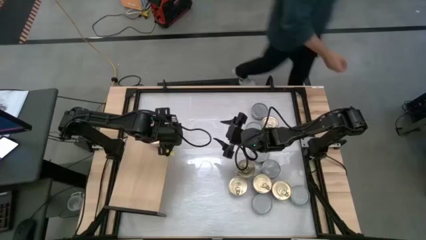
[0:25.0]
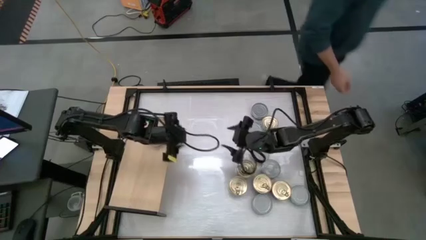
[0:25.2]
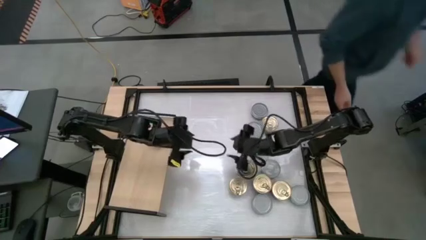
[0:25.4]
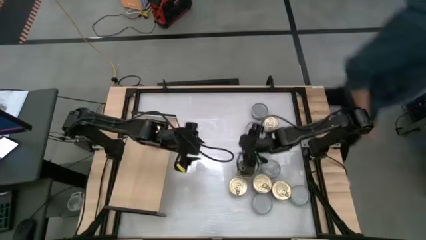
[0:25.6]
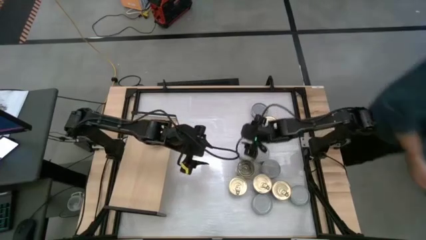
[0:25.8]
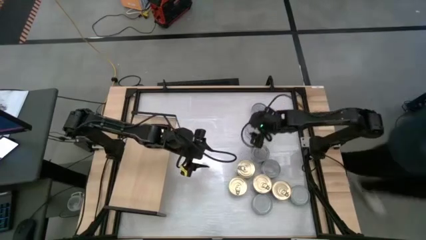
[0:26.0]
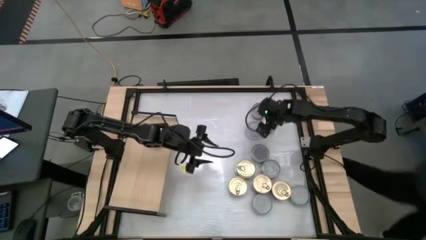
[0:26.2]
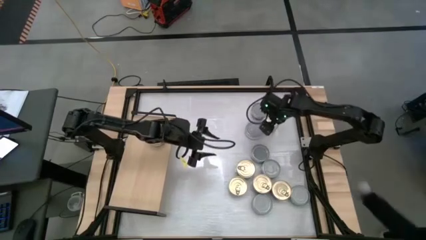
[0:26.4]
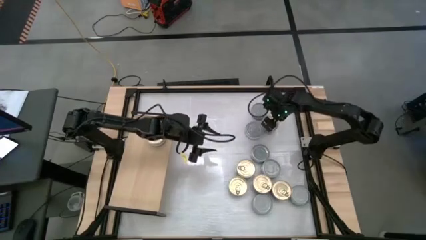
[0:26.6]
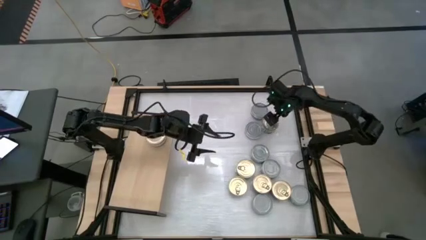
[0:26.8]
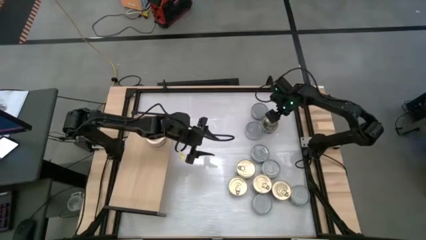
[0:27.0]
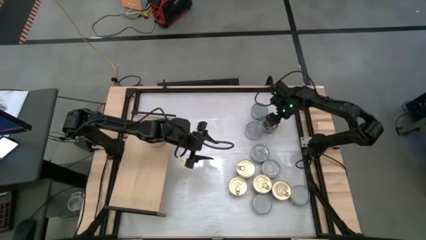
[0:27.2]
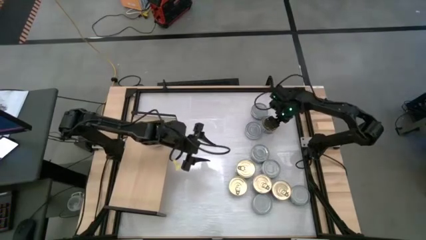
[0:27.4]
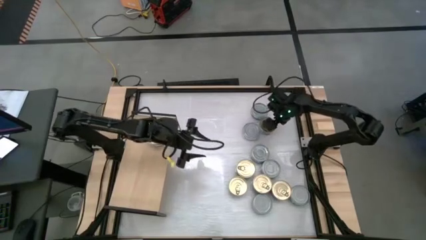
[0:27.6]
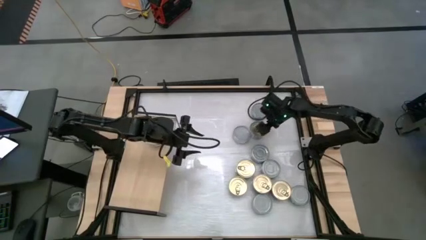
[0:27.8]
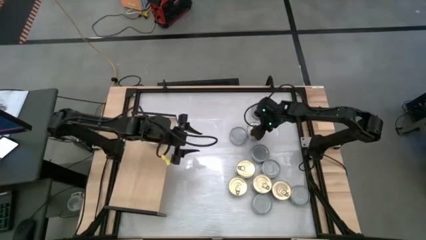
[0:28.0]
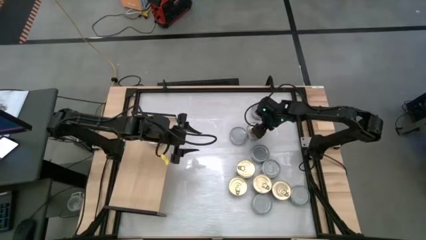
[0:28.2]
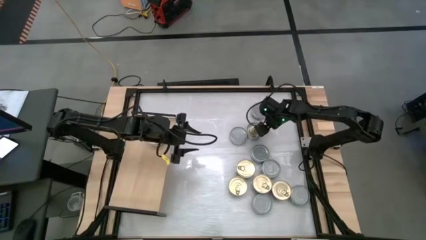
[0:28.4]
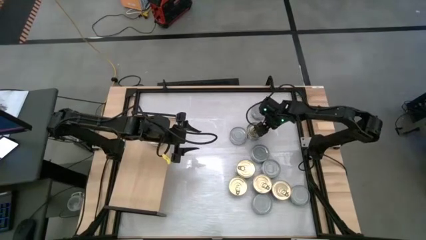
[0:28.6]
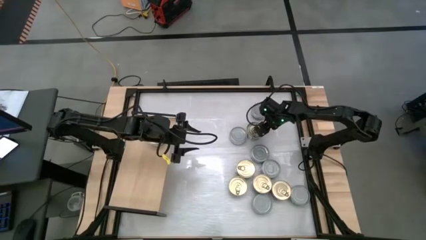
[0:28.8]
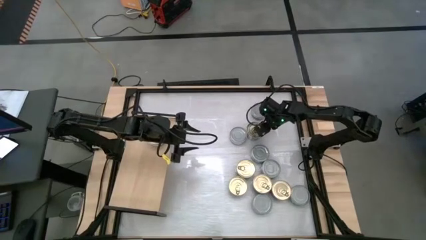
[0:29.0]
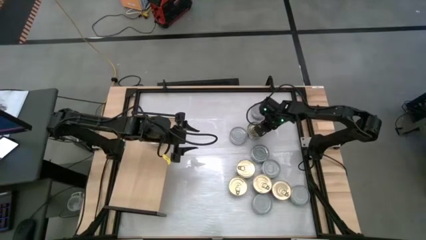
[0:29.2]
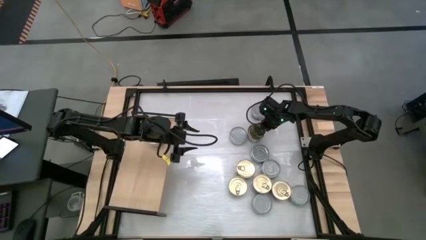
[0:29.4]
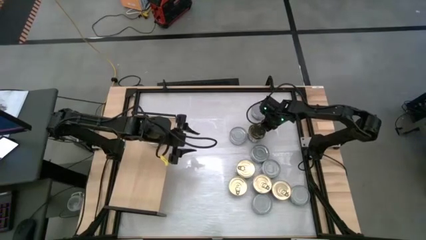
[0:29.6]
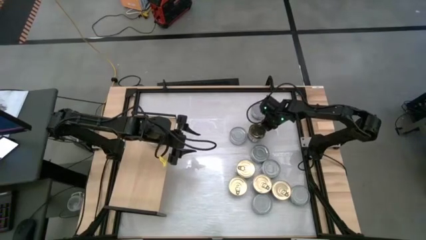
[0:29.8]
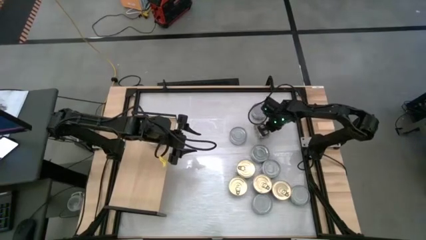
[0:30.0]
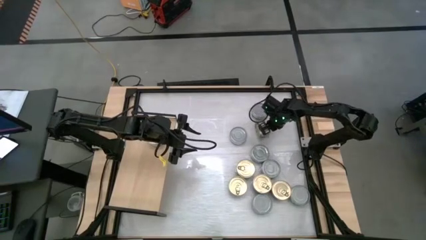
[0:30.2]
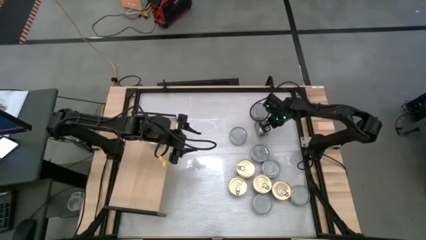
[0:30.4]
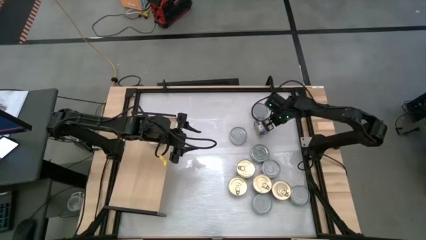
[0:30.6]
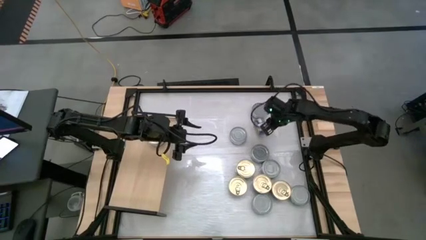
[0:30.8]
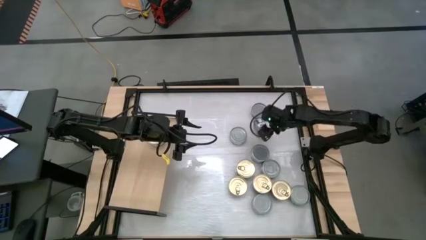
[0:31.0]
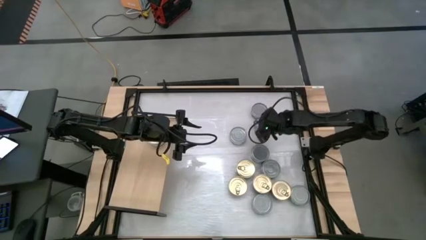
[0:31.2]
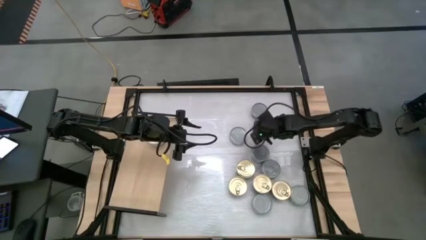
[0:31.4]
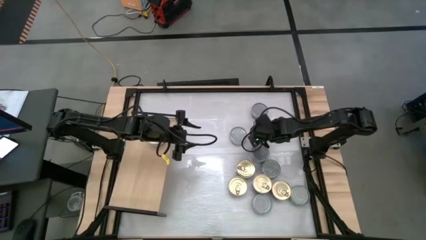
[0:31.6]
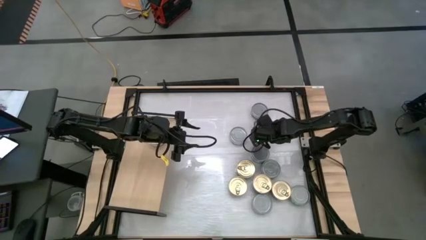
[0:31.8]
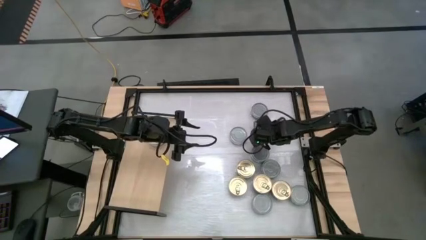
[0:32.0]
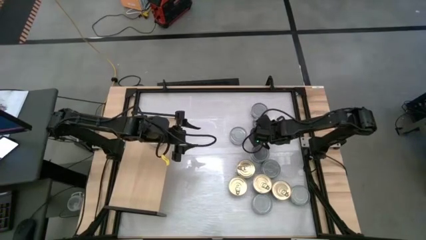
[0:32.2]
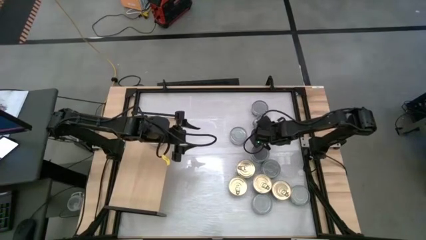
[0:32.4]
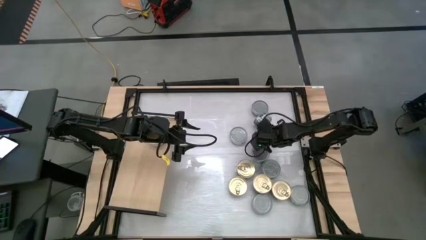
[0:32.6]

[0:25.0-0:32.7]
Task: Stack canned seafood by type on shelf
Stack the blue tuna can on top of the blue tuna can on the shelf

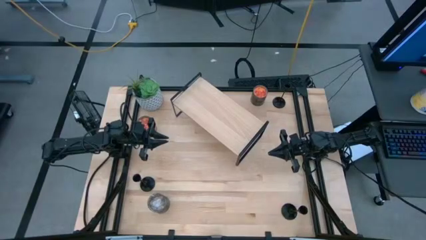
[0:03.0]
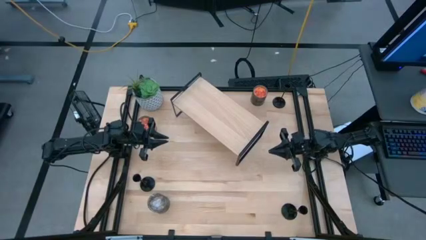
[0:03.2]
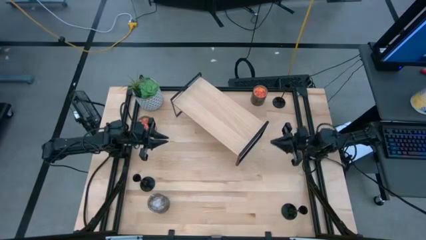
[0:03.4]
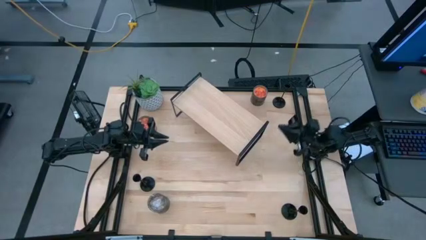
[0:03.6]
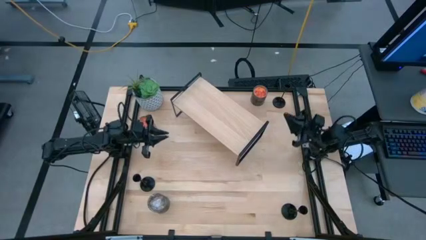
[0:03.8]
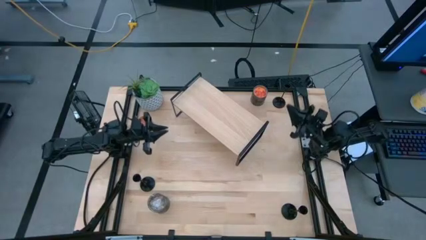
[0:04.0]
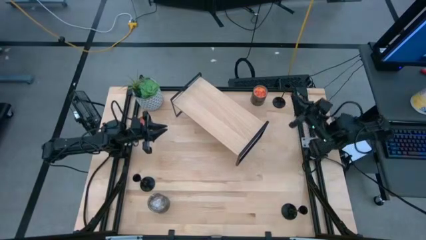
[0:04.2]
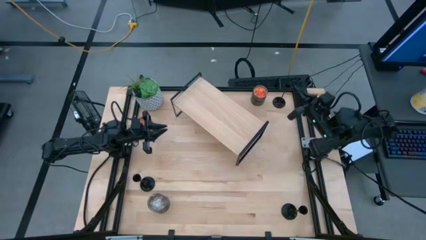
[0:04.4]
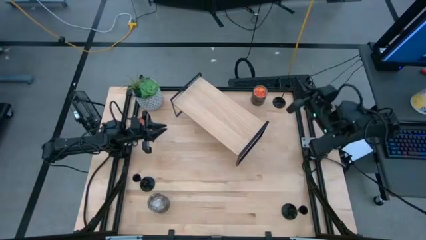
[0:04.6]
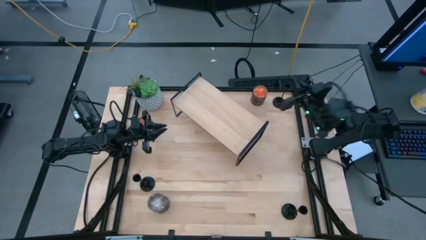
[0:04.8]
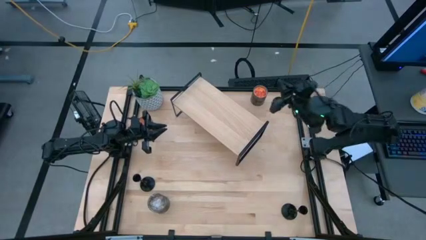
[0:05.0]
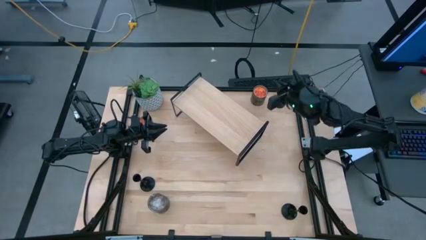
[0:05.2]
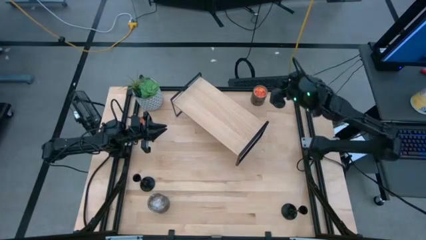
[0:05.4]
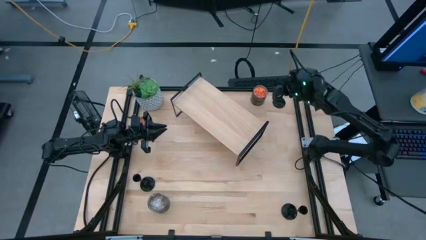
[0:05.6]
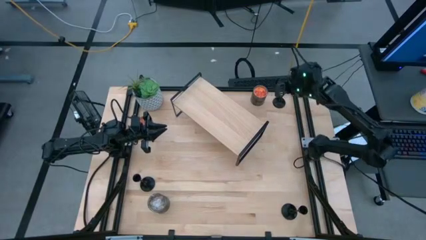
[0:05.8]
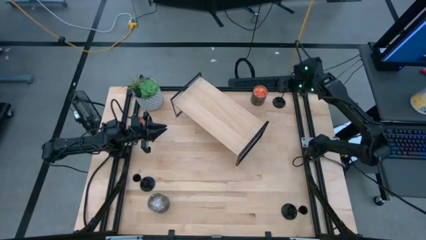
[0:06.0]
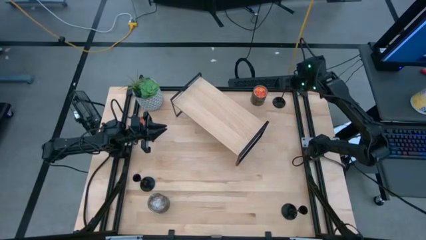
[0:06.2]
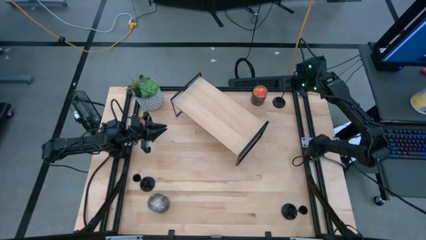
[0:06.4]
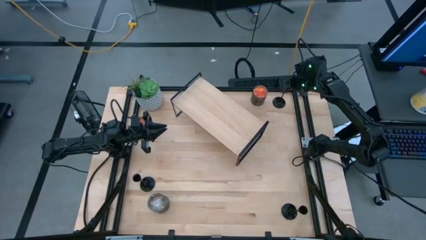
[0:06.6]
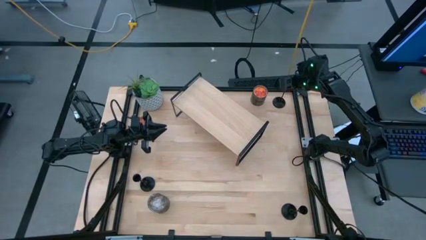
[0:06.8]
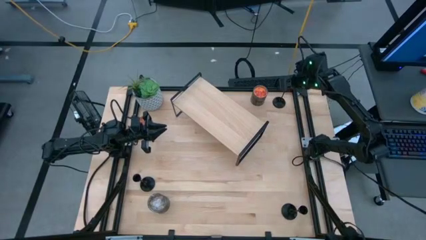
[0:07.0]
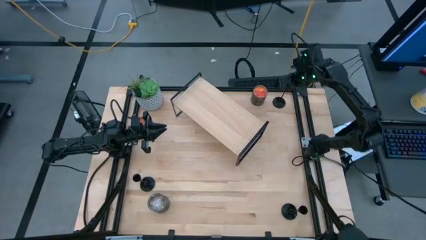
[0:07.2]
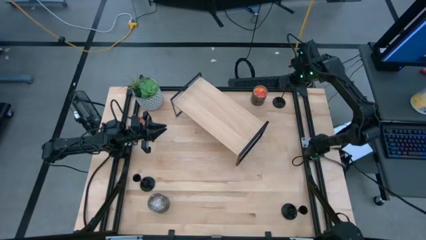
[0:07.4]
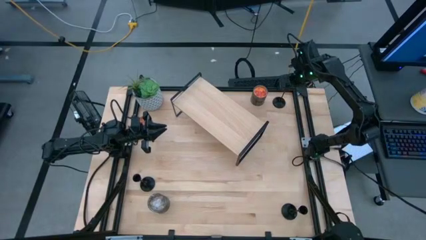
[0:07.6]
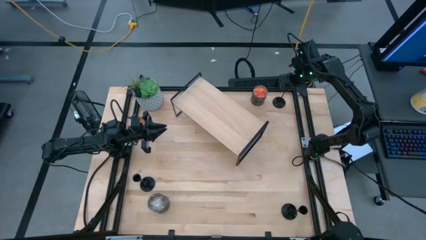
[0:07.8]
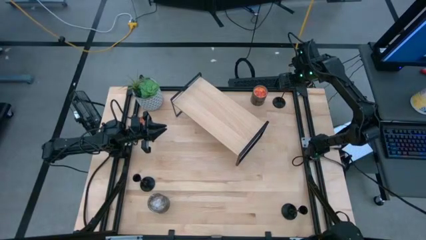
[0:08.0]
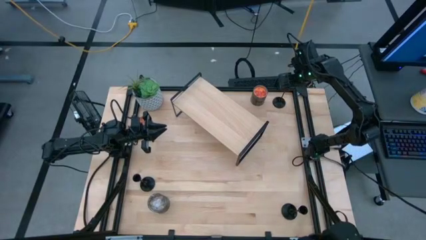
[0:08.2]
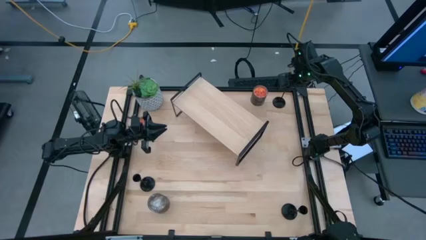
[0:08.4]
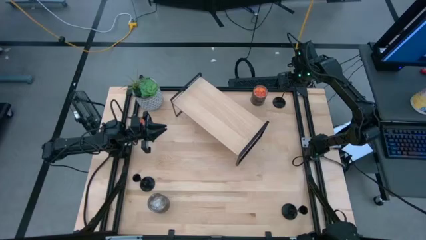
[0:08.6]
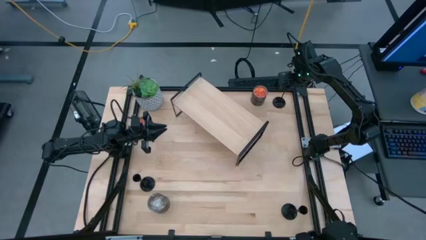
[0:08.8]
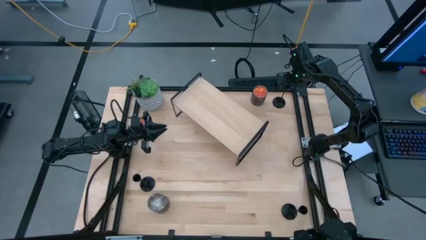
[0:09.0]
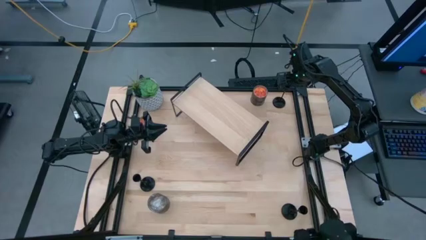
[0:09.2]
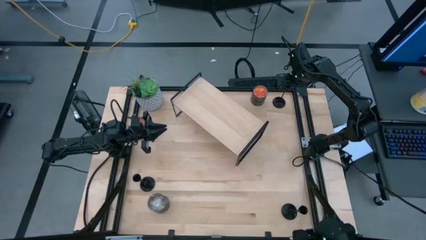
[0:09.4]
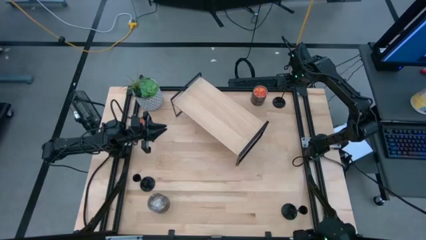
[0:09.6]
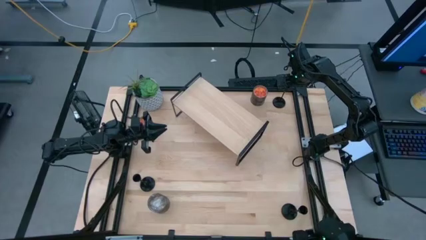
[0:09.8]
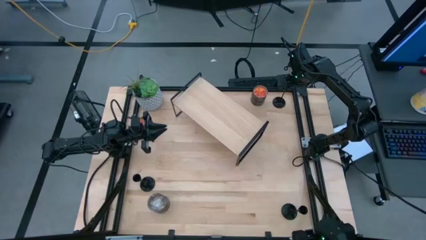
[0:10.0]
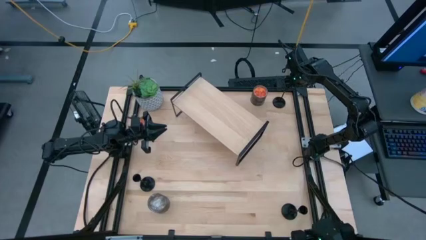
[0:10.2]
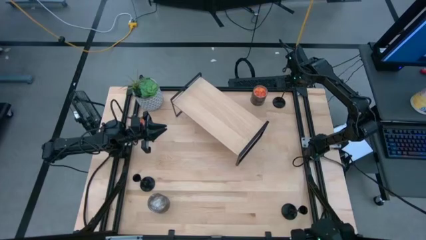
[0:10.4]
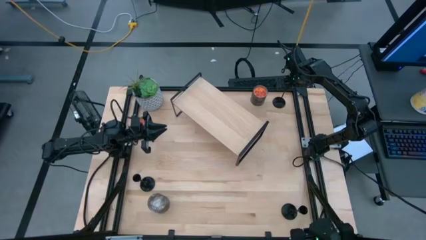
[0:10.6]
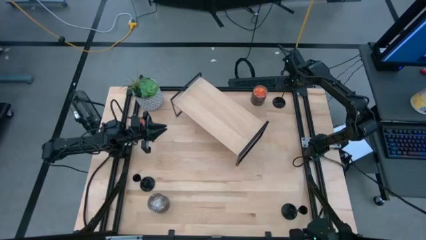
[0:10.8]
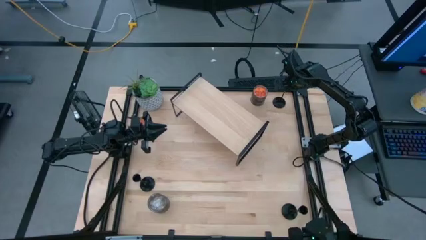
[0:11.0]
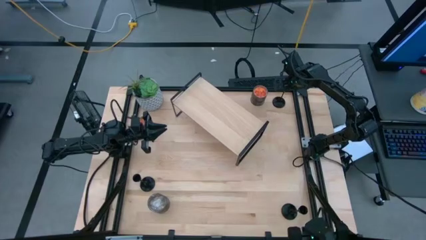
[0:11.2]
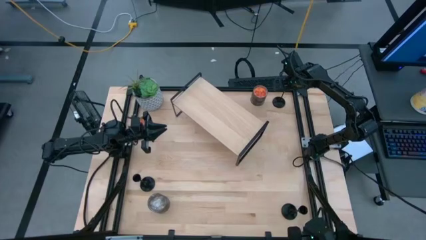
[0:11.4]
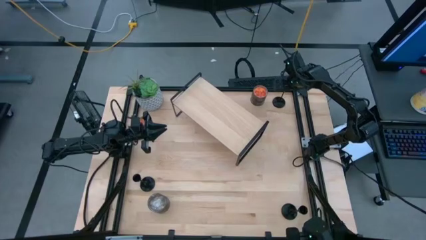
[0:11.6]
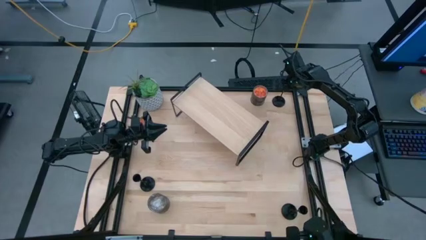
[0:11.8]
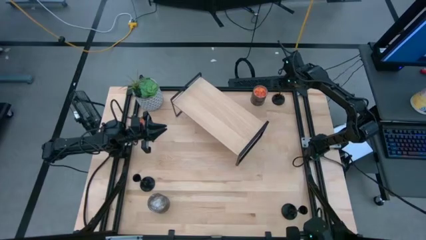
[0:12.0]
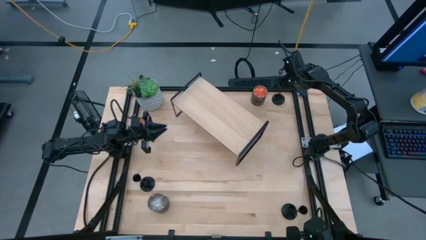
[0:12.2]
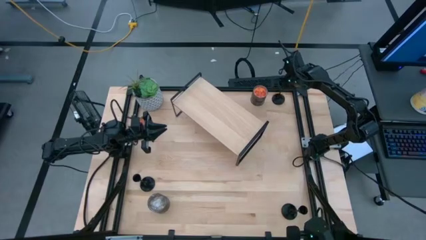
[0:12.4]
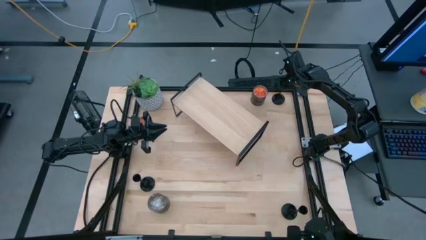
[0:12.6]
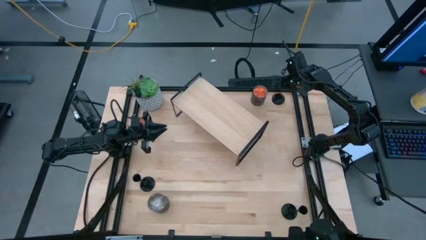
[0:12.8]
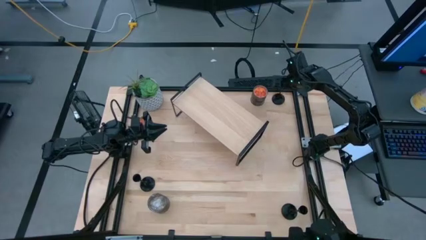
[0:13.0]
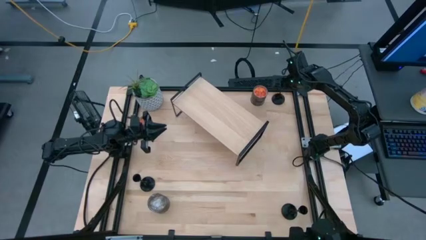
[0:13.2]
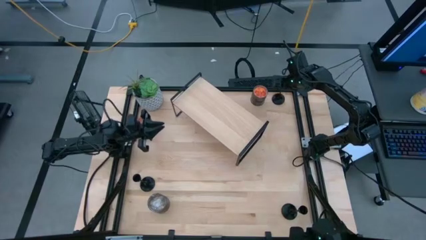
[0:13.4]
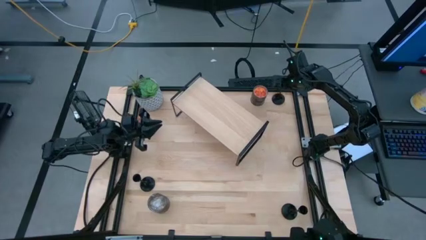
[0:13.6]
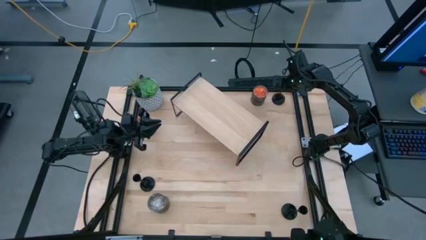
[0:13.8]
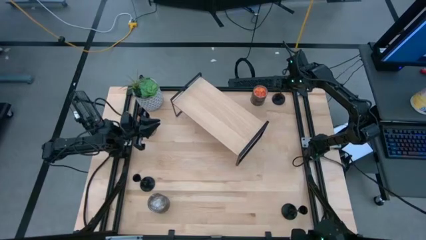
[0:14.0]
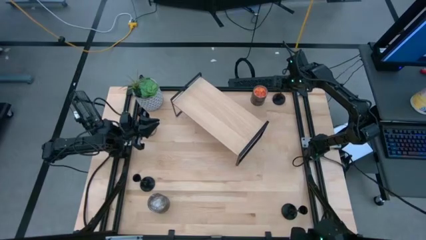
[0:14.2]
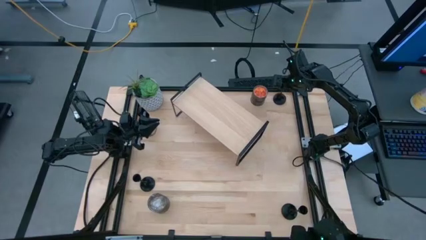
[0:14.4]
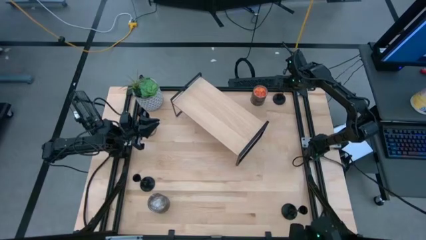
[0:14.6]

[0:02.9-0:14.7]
Task: Pick & Place candle stick holders
Put the top right black candle holder on the shelf
